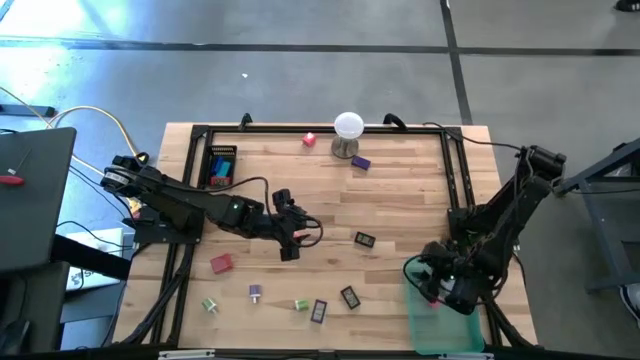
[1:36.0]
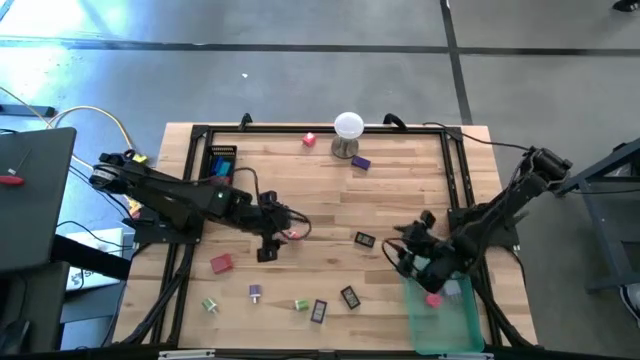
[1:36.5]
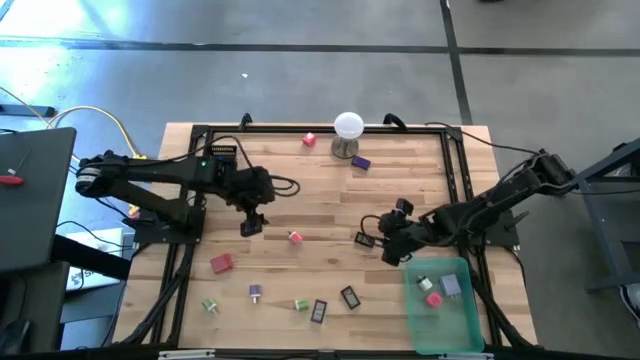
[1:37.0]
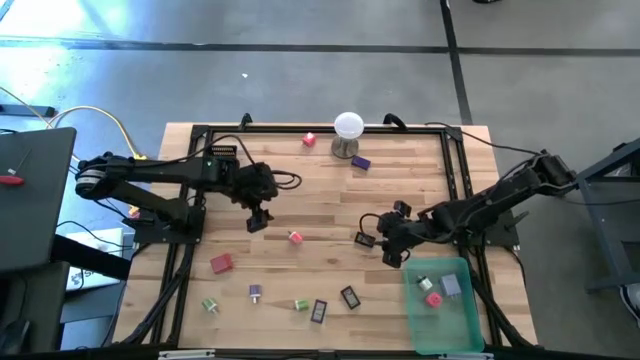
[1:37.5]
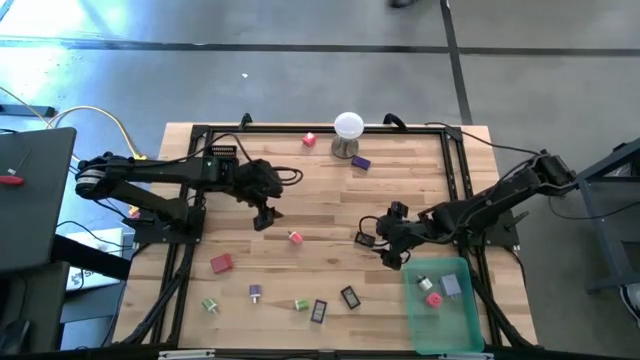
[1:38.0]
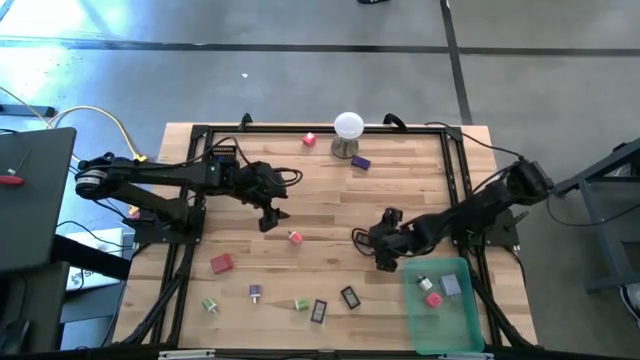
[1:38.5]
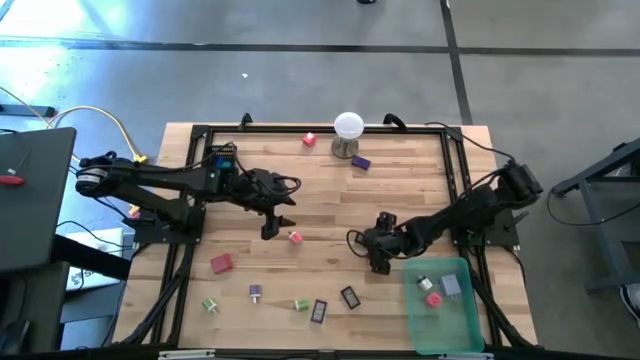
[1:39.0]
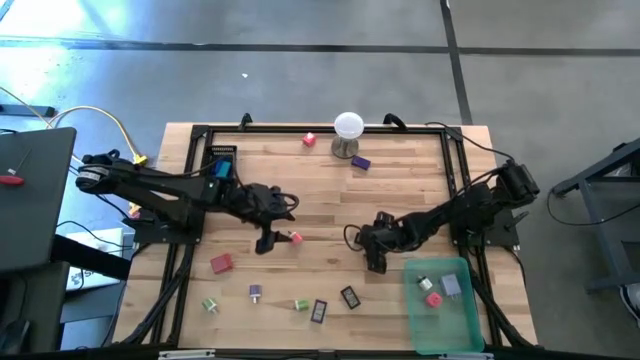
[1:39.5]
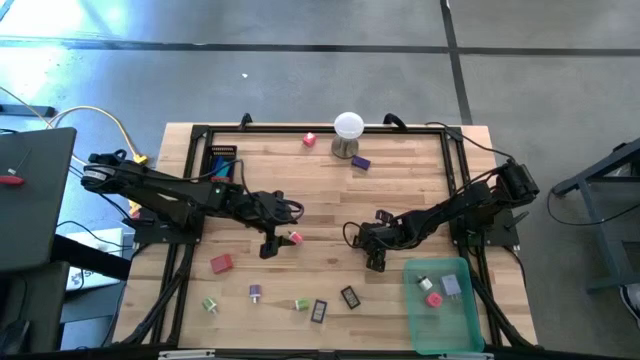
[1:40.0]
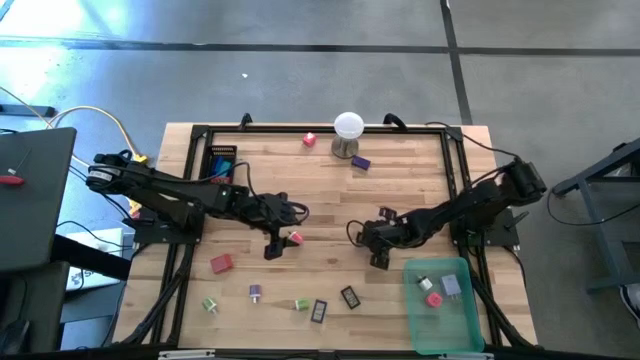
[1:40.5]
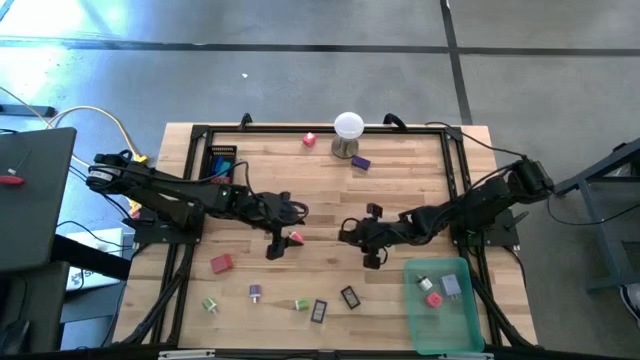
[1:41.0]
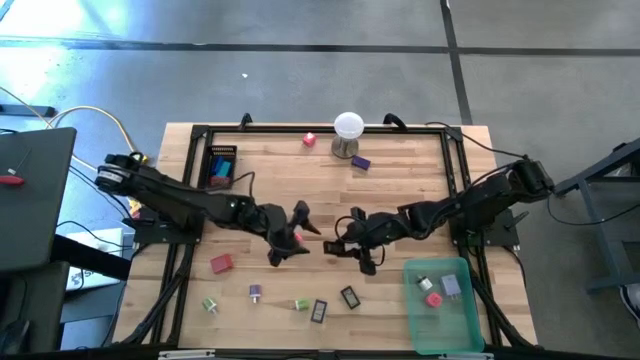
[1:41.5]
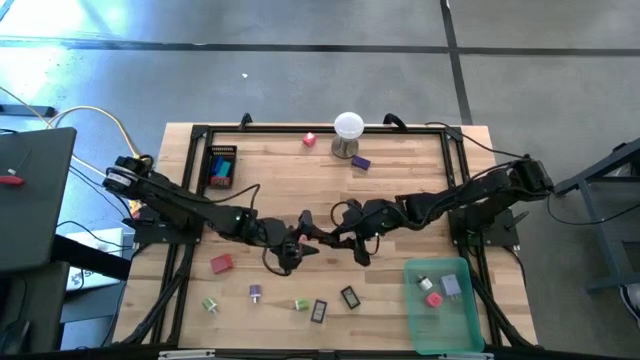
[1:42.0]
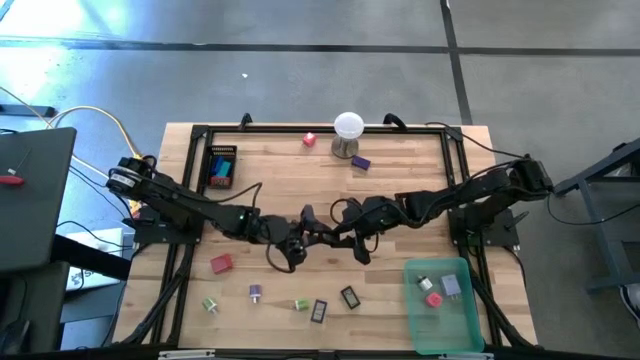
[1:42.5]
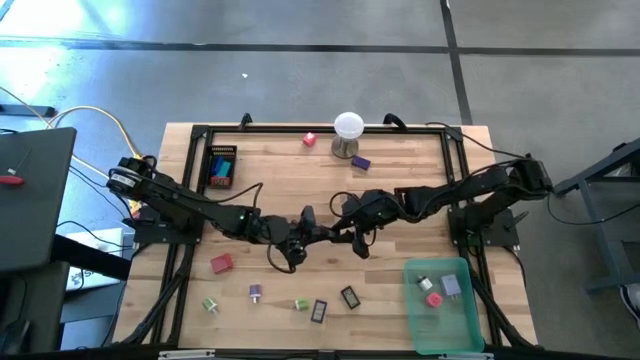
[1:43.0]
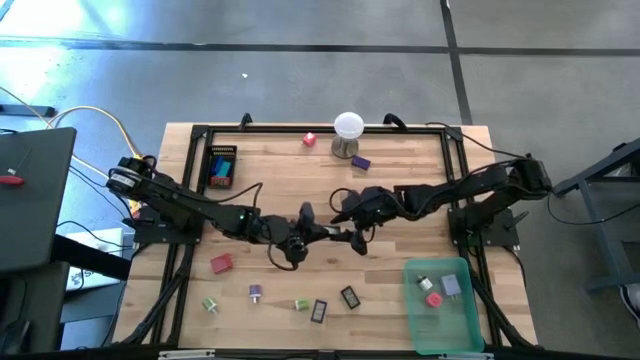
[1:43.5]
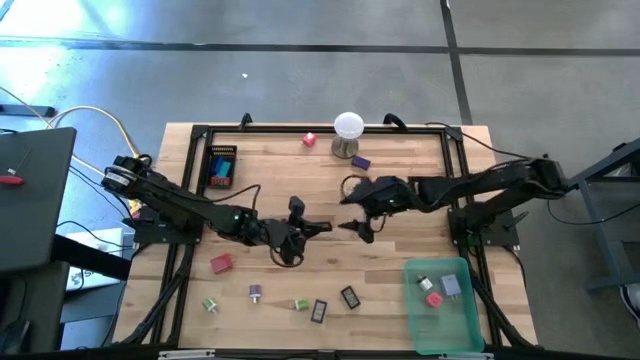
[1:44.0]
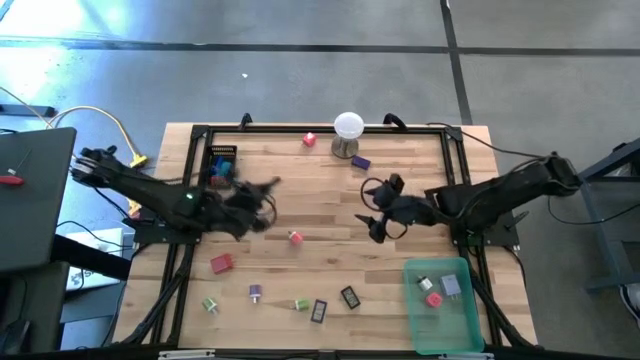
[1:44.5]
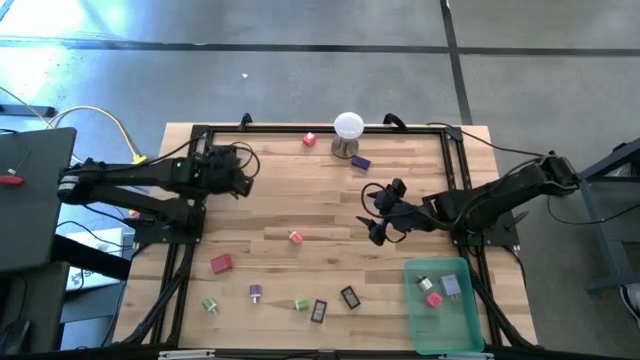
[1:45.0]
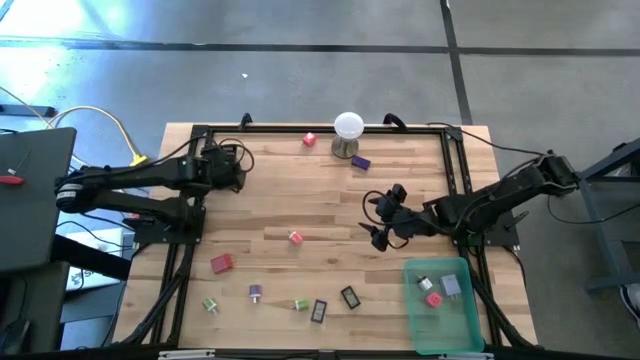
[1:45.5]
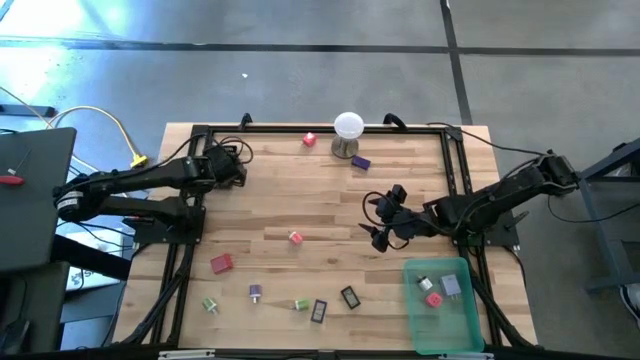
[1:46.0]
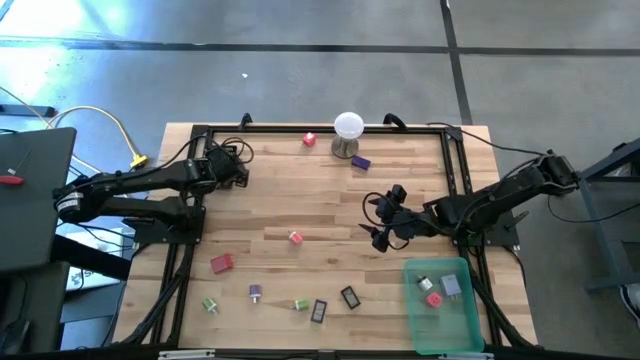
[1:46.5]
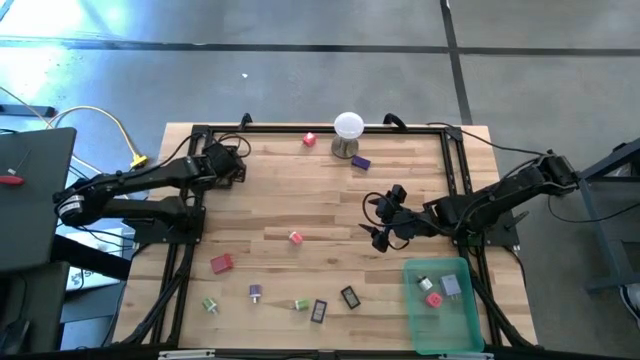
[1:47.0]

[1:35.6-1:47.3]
Task: Pick & Place Office items
Put the black digital clock into the black bin

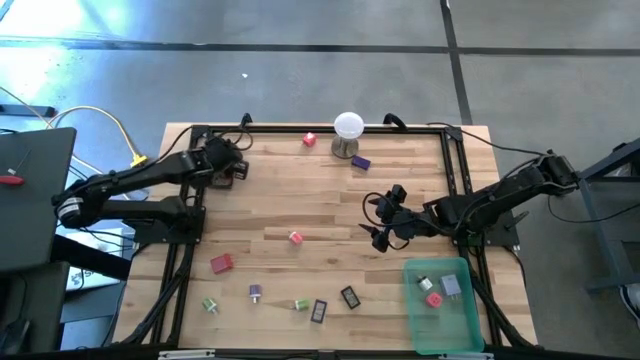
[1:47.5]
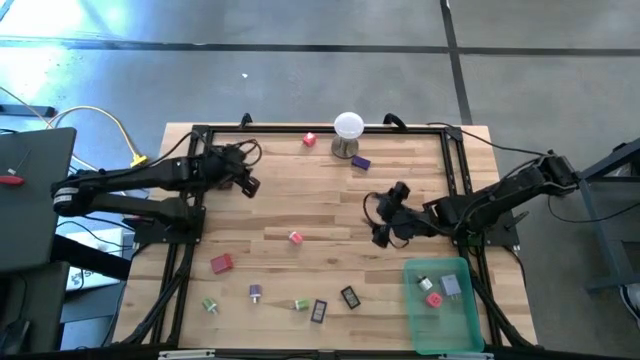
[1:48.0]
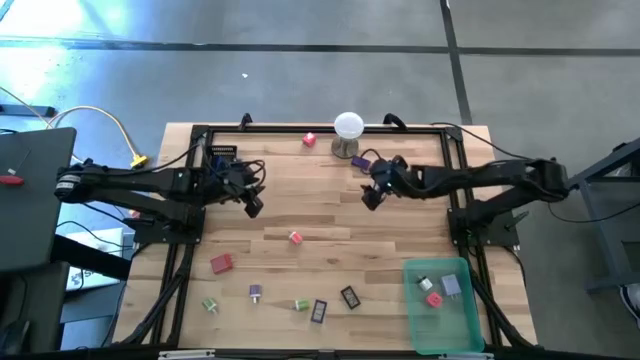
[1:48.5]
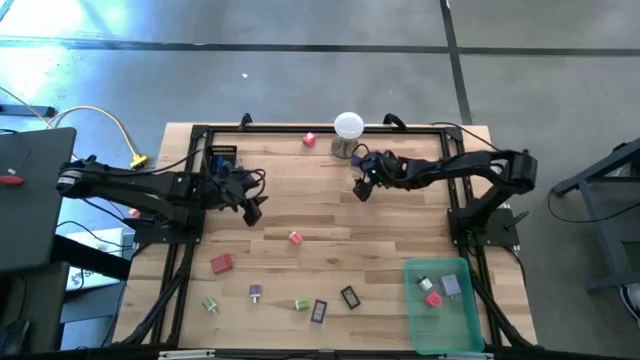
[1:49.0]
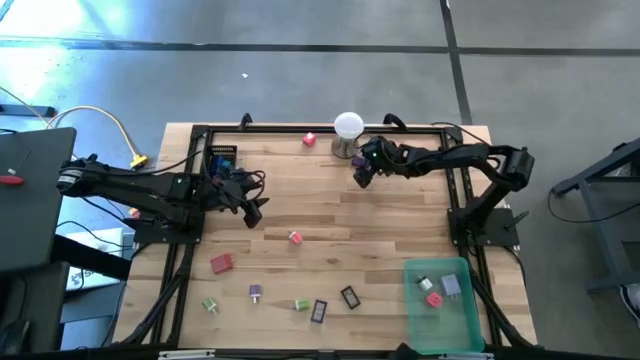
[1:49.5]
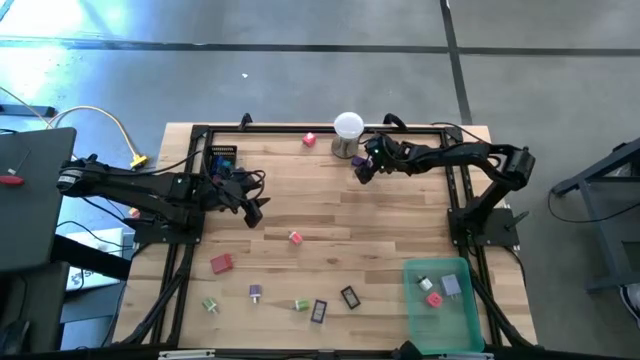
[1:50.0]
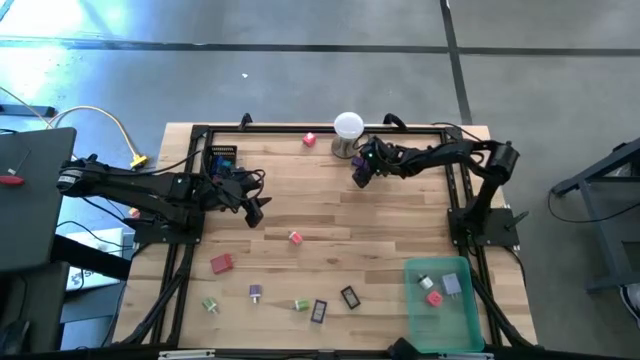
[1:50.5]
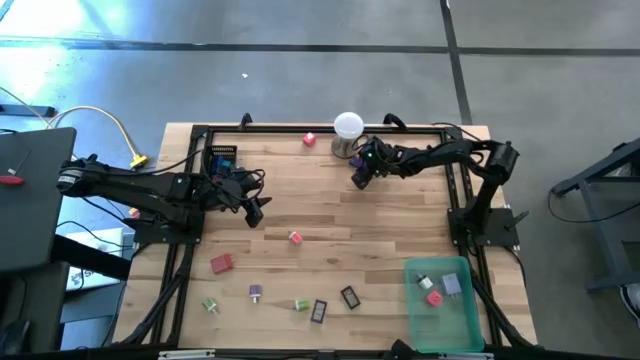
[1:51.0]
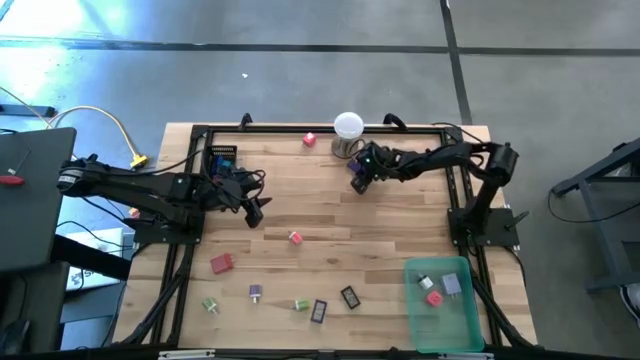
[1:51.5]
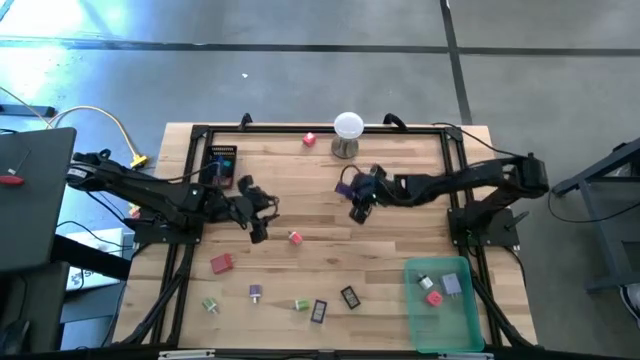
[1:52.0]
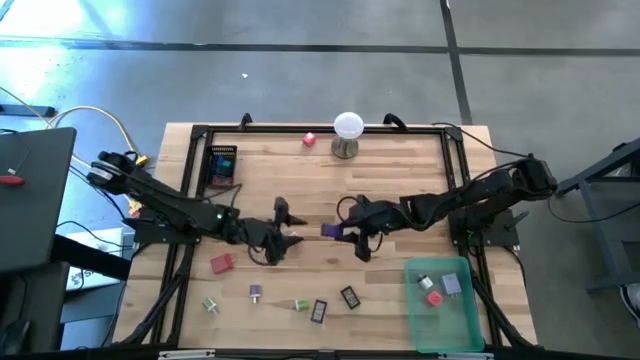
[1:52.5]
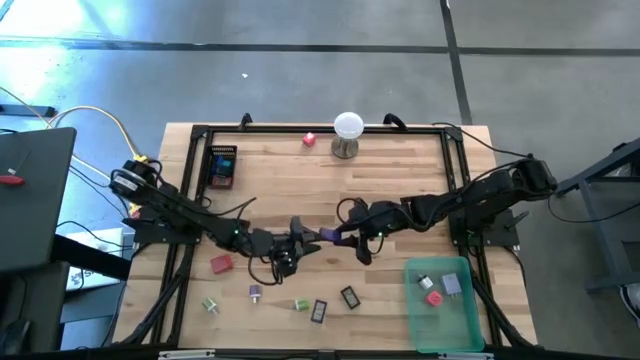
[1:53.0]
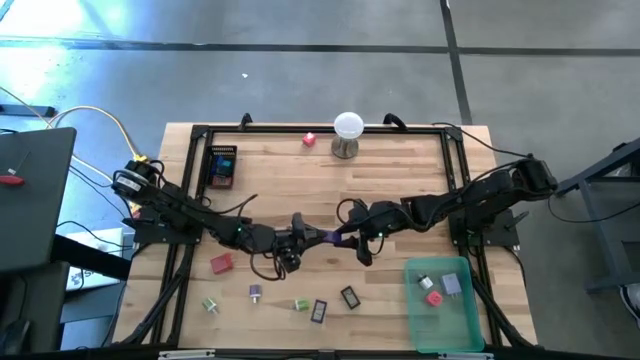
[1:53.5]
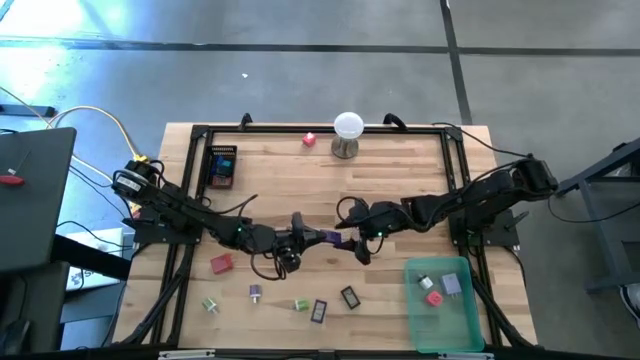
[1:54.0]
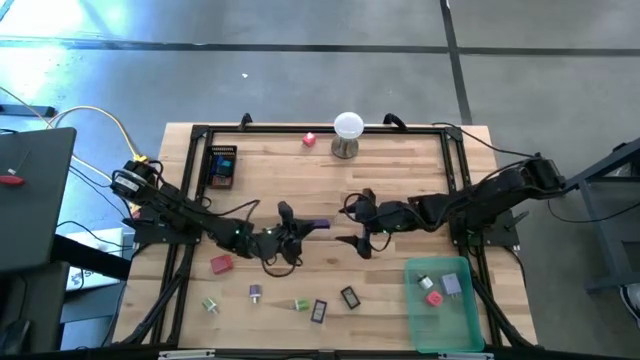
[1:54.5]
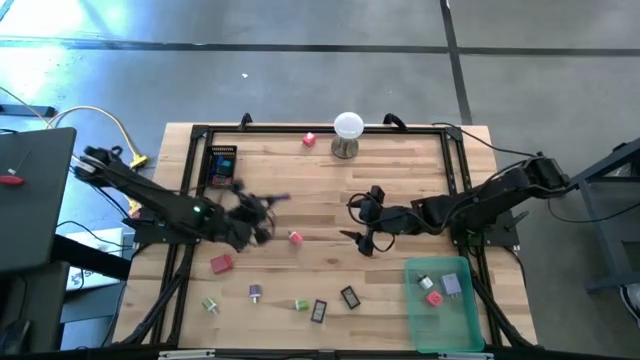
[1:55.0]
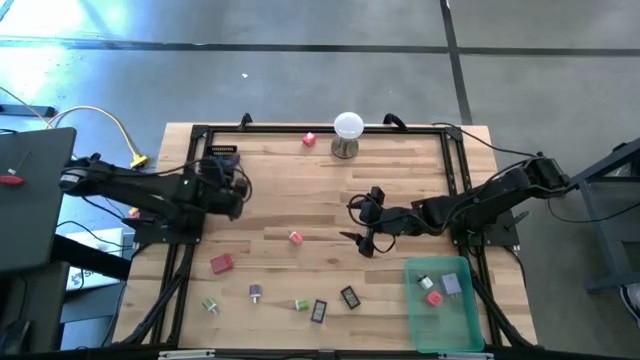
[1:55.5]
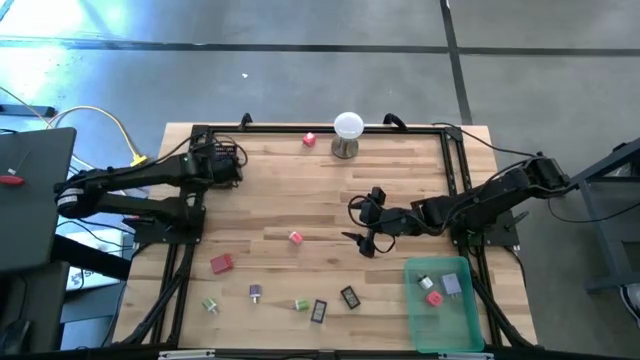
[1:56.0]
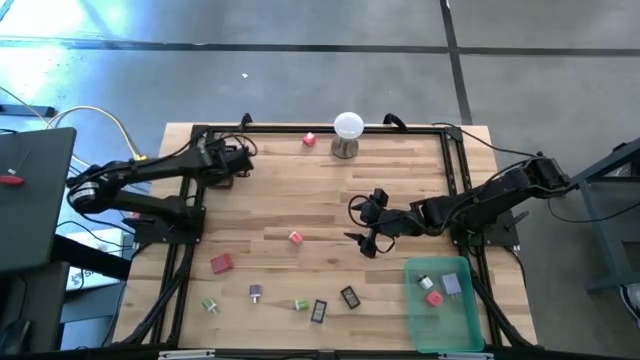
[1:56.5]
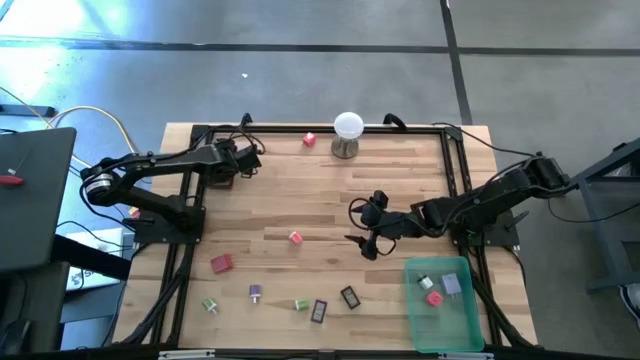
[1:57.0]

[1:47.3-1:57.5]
Put the blue digital clock into the black bin
